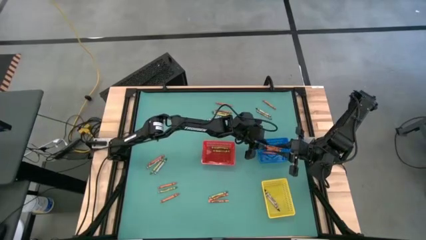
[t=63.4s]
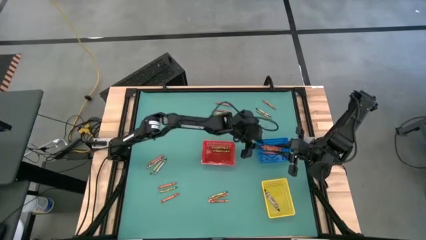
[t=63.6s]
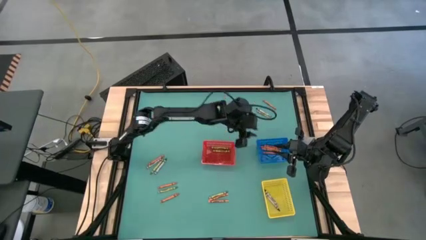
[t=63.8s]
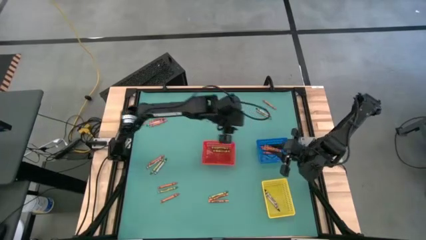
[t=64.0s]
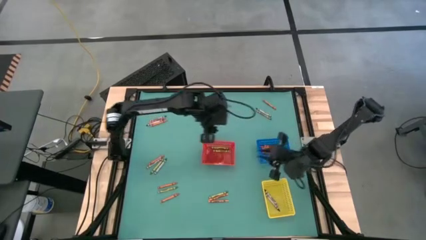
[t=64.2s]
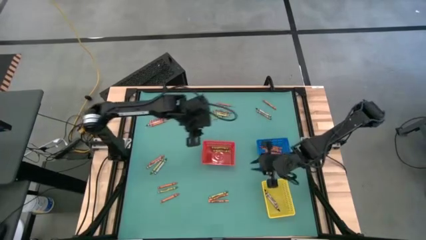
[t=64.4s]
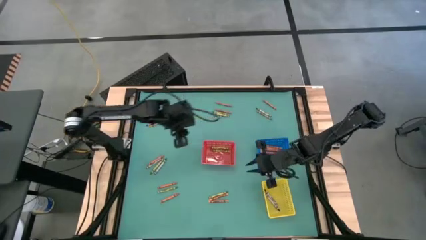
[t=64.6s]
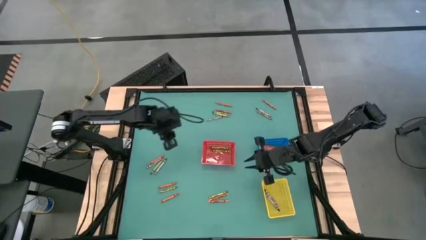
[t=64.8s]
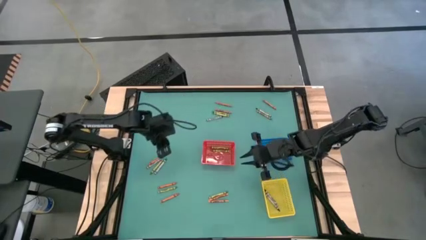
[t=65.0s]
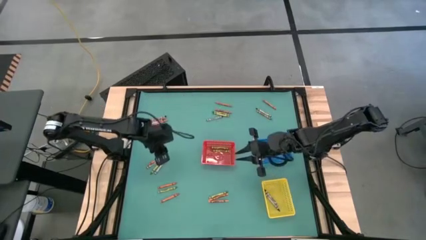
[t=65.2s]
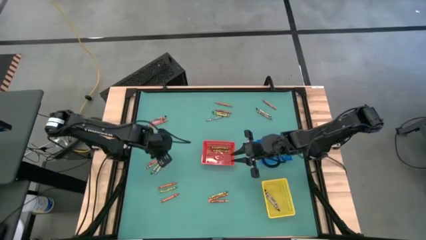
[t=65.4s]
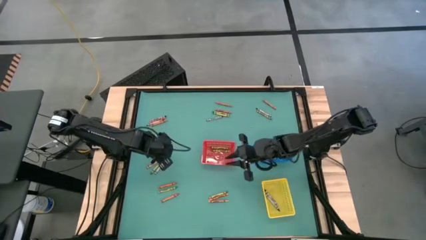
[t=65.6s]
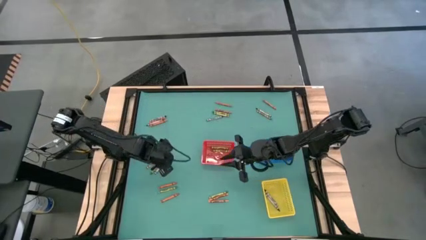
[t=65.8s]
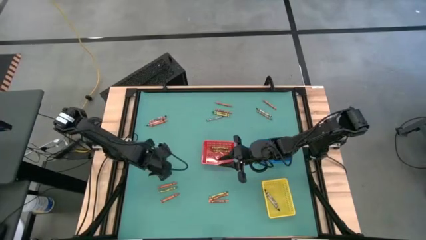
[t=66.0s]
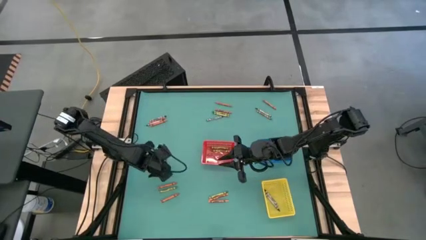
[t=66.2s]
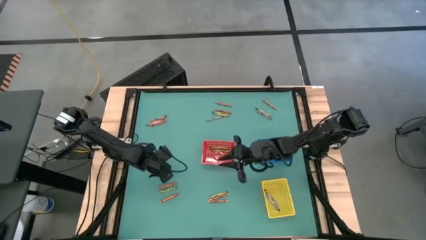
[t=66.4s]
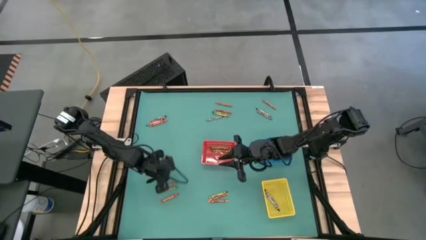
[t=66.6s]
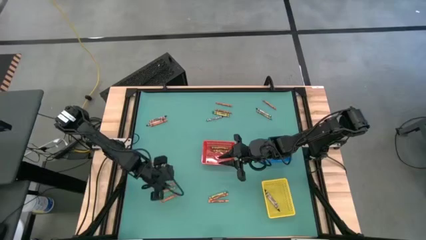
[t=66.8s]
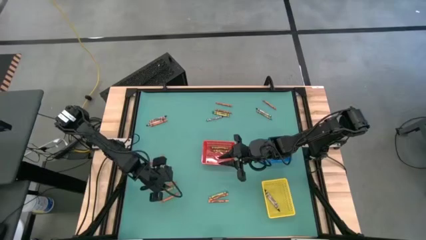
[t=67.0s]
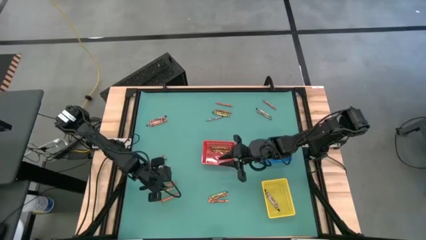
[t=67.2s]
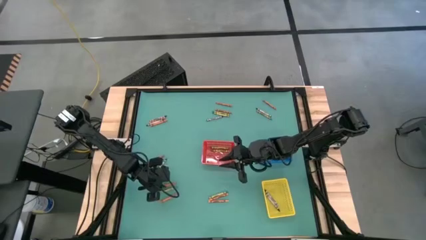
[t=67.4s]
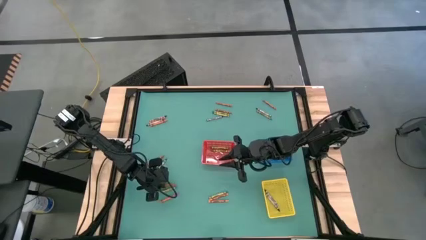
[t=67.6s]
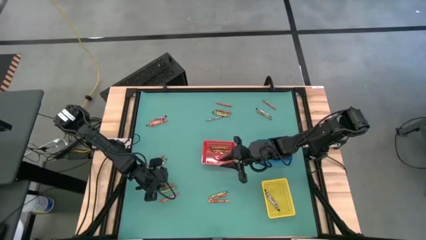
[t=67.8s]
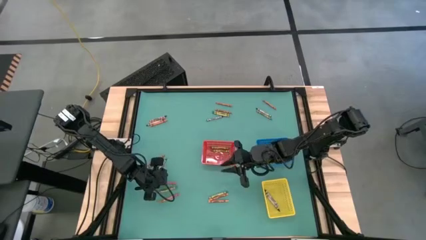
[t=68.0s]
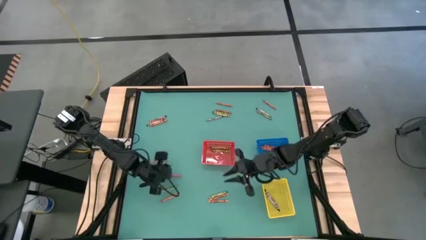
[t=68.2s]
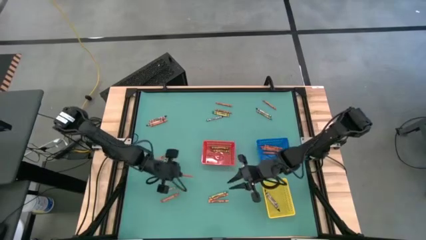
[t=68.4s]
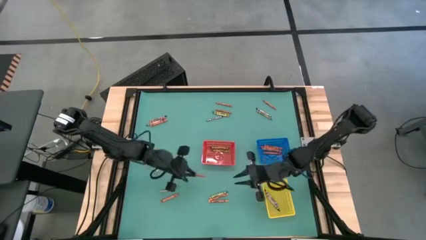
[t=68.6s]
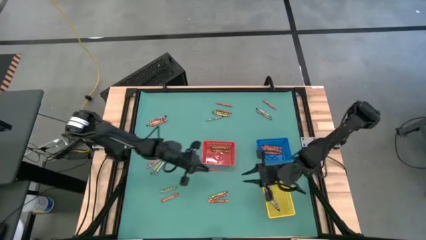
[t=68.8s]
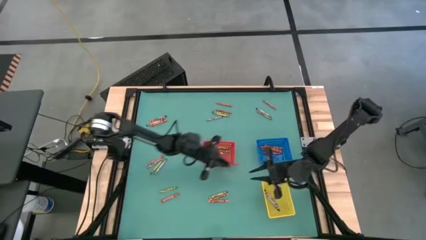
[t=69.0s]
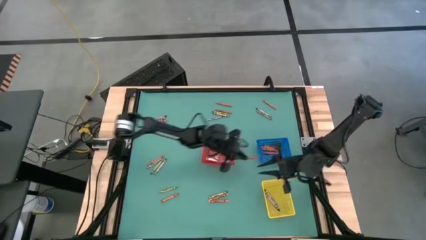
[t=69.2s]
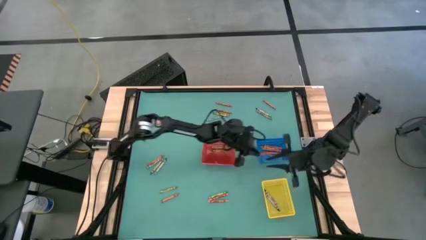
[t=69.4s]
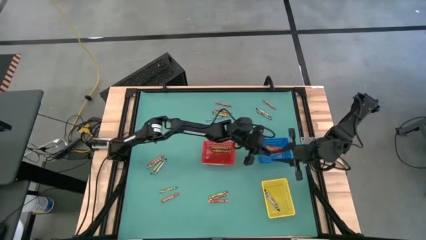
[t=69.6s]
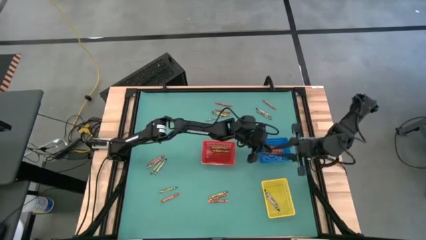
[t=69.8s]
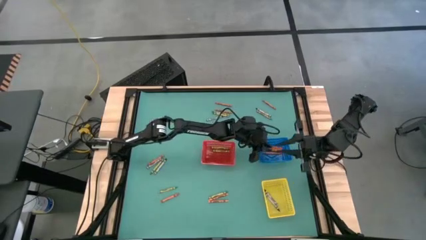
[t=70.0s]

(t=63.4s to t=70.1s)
Task: Sort crayons
Put the orange crayon into the blue basket

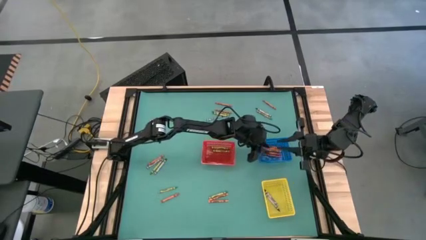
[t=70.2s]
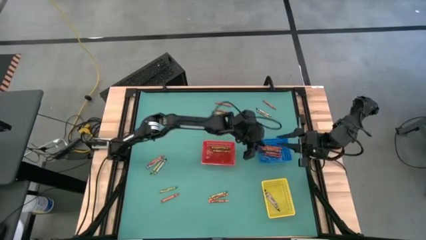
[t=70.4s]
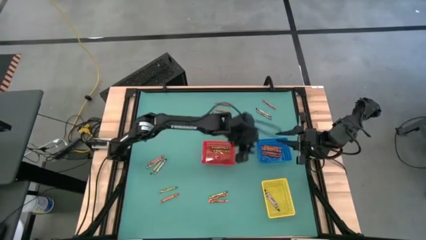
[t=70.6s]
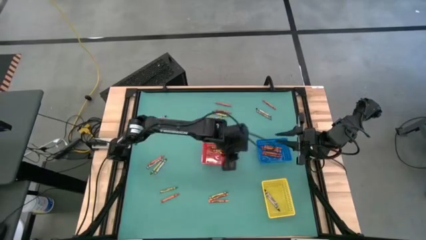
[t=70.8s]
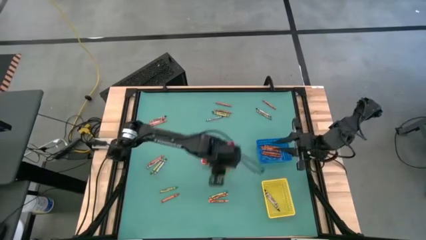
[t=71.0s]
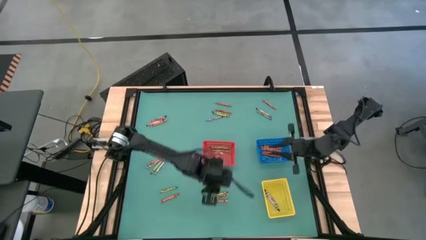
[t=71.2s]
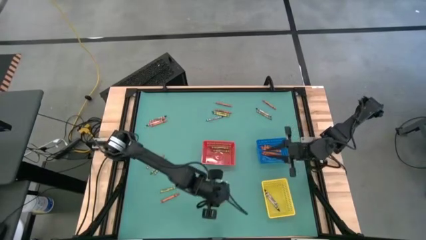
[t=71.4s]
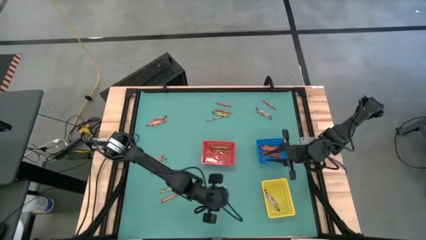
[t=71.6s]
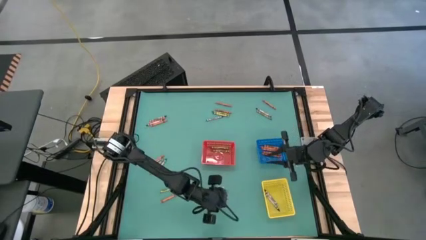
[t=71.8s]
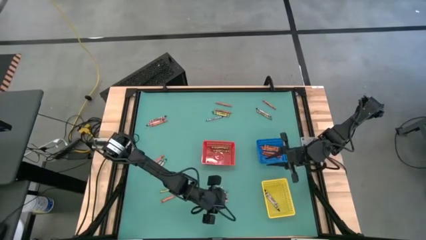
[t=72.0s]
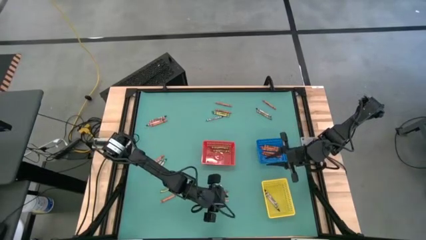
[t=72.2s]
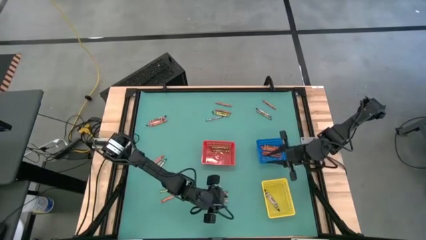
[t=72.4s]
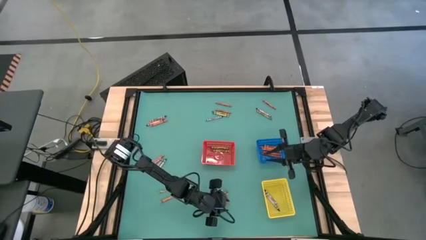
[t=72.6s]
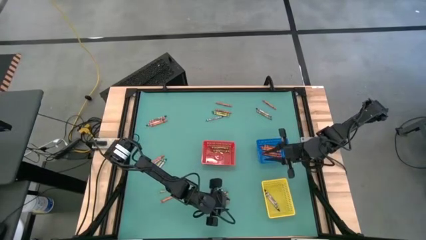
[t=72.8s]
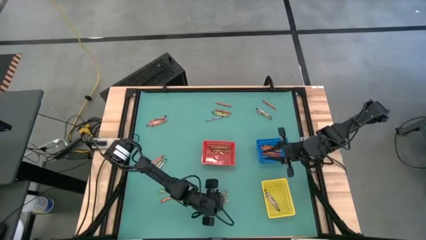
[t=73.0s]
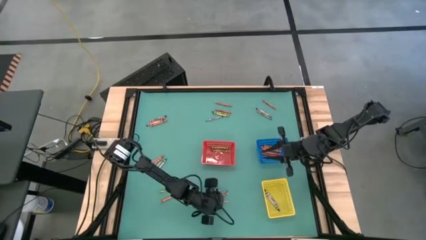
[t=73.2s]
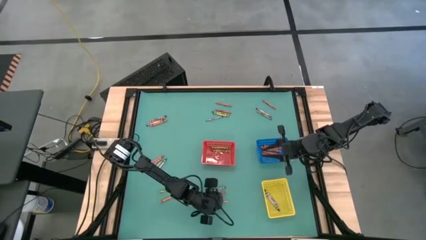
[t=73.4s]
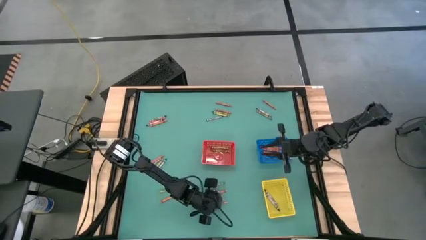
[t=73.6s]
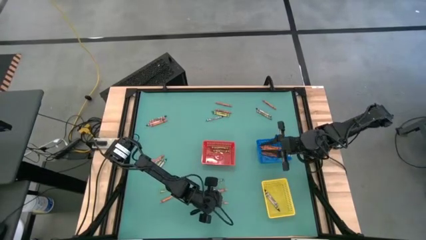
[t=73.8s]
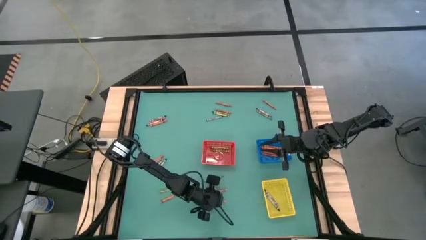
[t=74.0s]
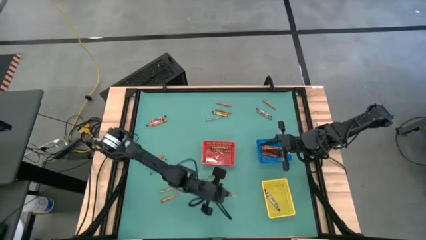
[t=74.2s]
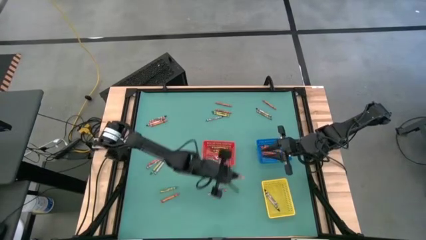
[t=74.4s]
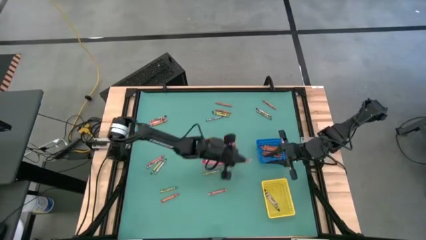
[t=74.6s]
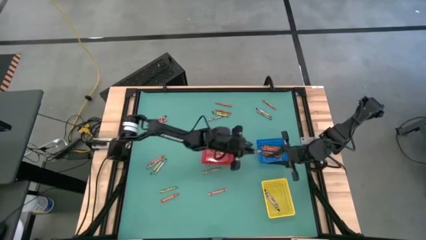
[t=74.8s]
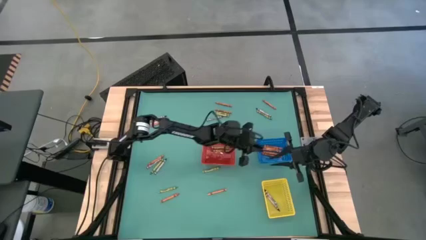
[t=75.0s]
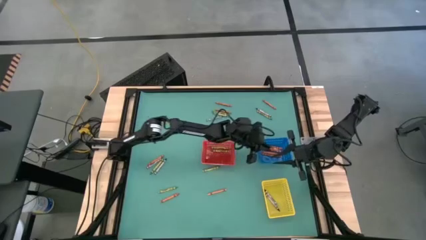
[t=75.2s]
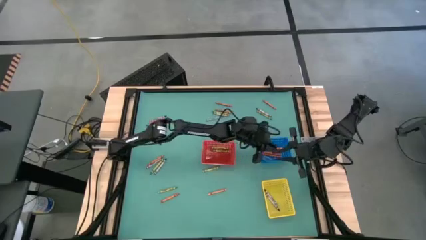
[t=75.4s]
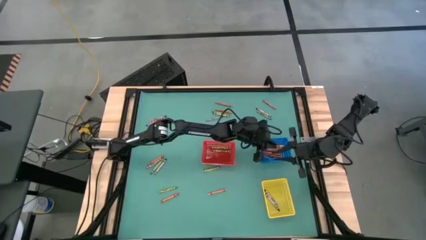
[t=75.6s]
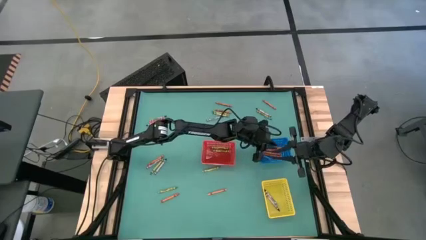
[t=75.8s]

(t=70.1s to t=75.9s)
Put the orange crayon into the blue basket

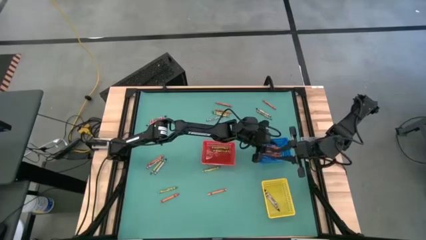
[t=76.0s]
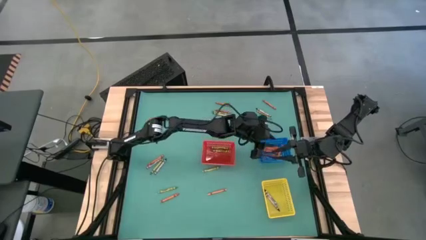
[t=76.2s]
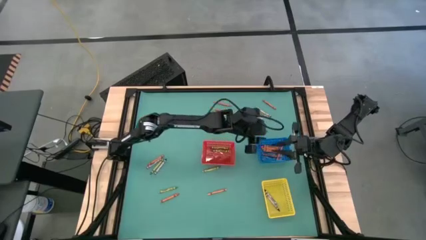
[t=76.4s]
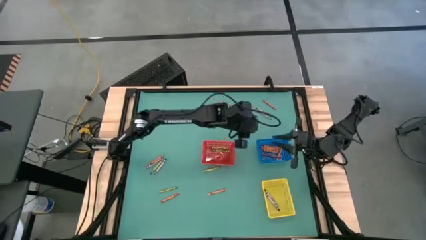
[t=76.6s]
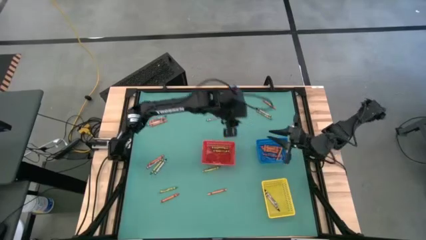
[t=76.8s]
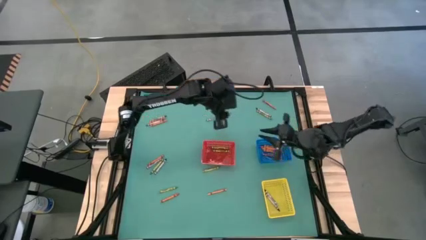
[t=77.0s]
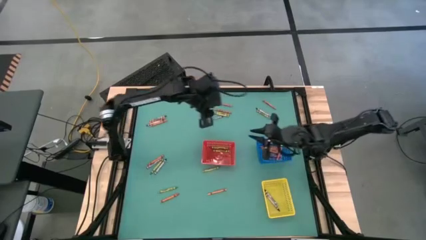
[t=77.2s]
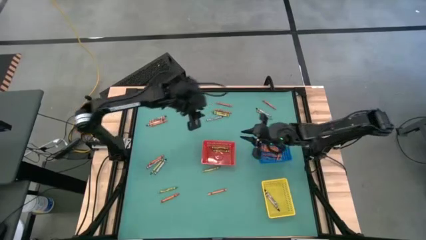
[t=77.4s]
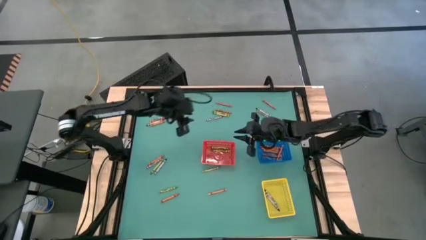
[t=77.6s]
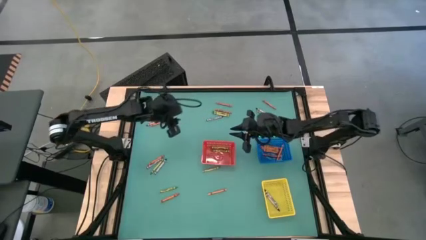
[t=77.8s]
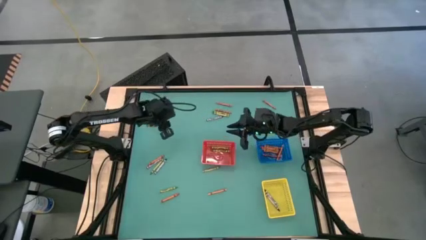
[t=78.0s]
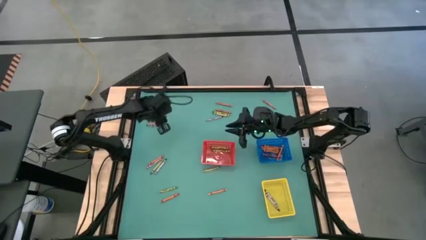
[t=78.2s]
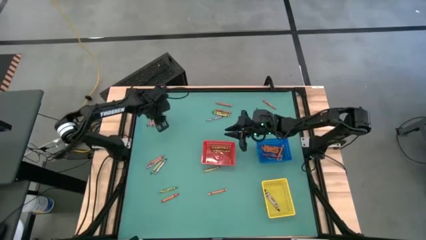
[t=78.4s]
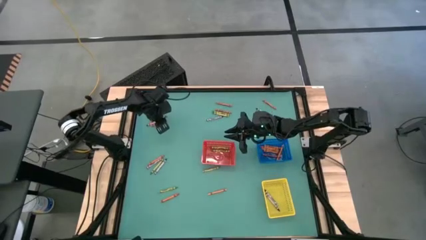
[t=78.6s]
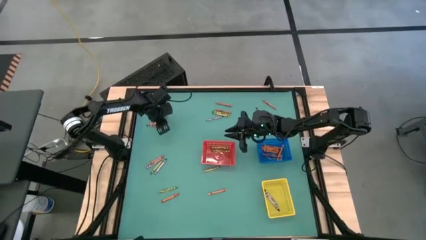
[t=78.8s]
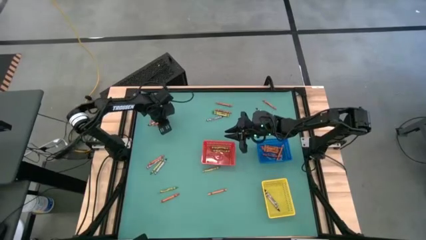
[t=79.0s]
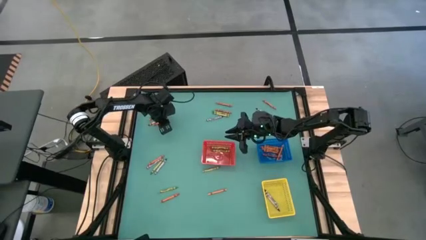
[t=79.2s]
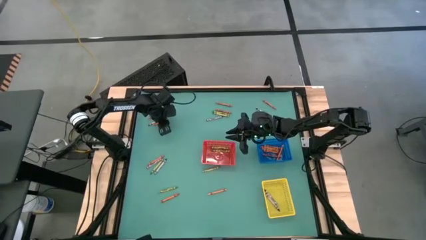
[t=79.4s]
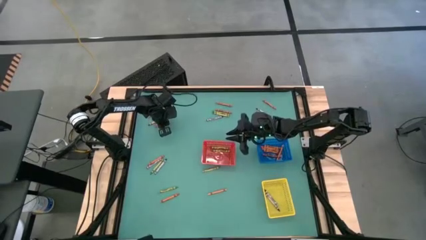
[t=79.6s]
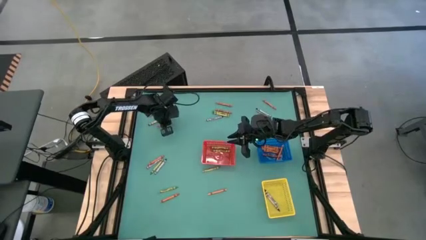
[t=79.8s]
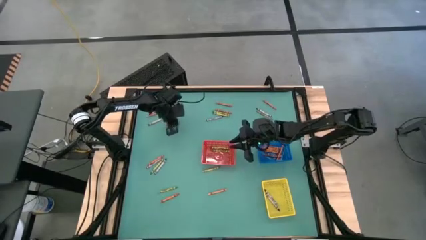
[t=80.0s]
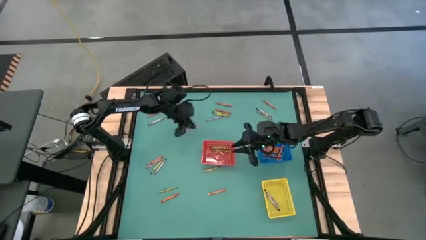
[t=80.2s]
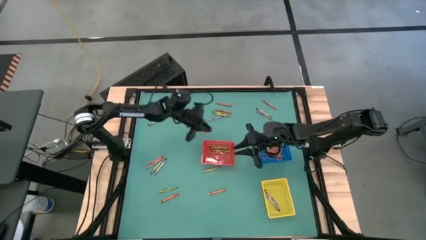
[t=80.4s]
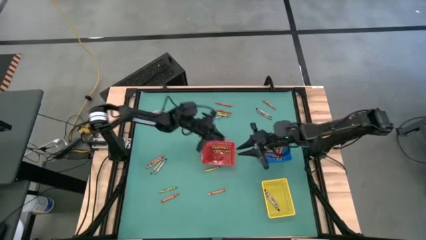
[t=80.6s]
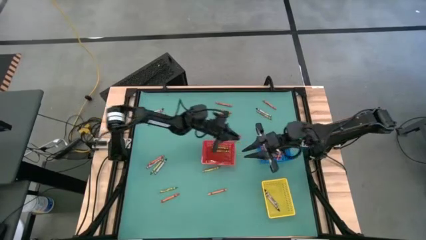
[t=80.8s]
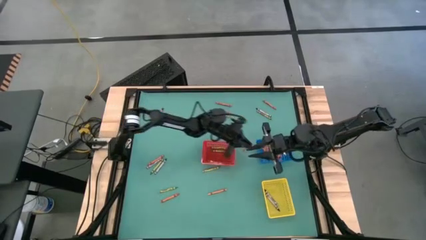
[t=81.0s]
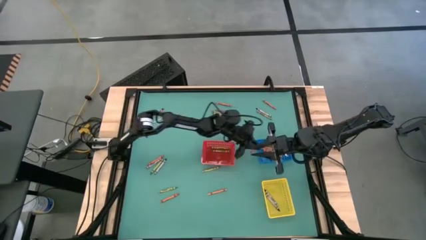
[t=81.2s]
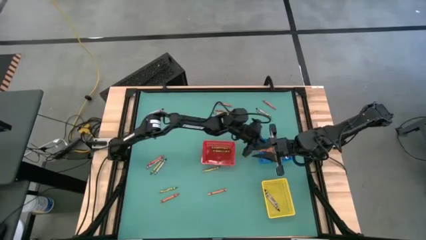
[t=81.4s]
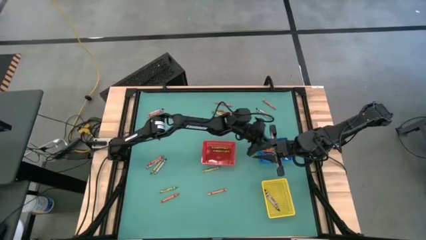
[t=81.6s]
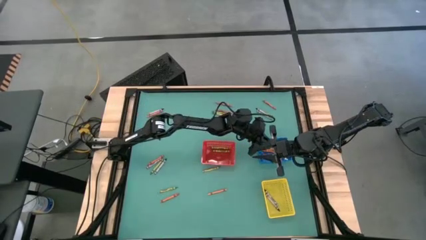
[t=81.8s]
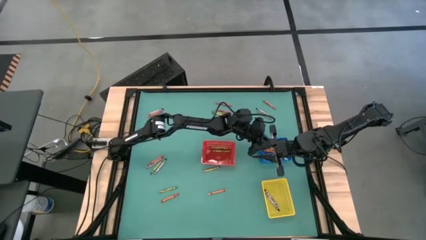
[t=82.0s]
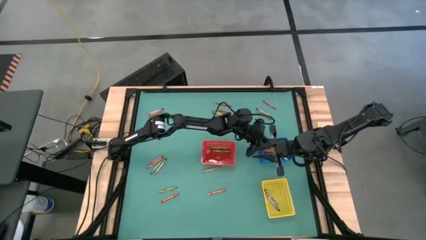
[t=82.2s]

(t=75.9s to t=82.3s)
Put the orange crayon into the blue basket
